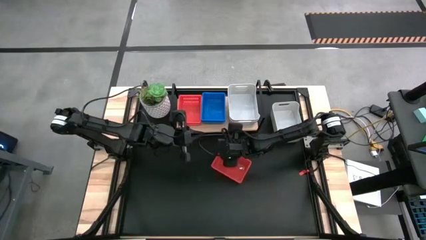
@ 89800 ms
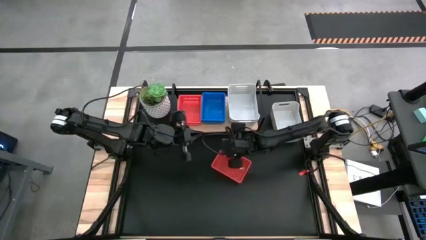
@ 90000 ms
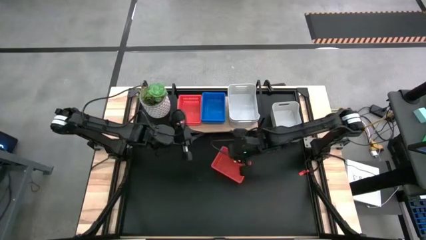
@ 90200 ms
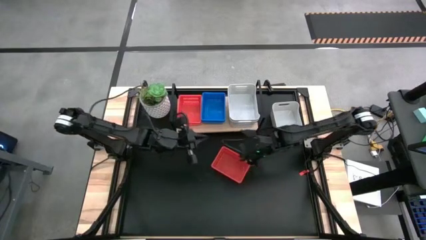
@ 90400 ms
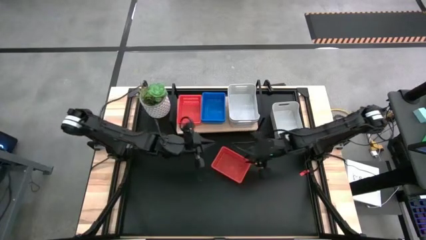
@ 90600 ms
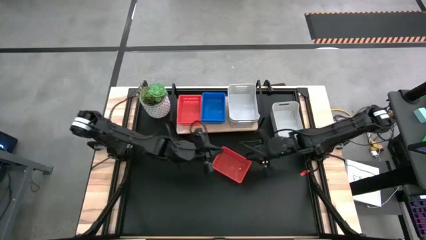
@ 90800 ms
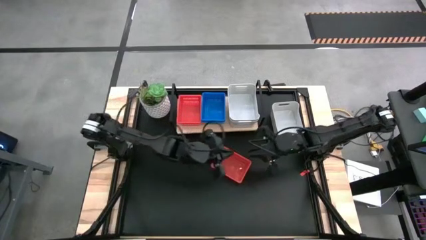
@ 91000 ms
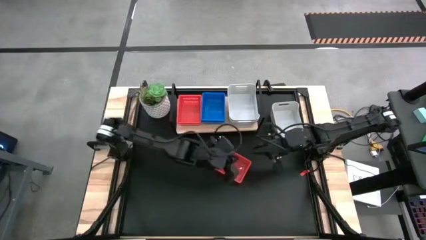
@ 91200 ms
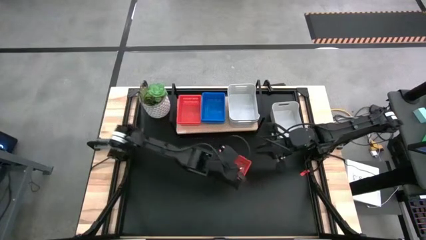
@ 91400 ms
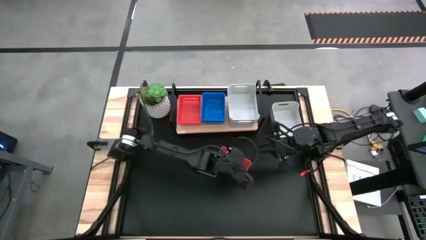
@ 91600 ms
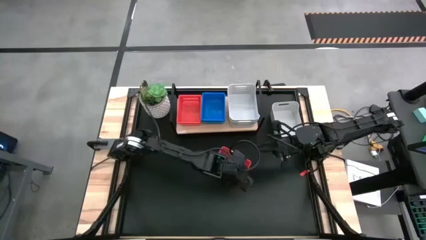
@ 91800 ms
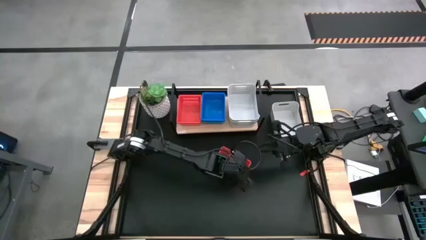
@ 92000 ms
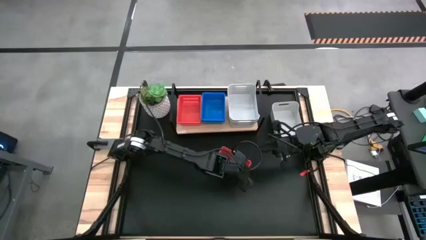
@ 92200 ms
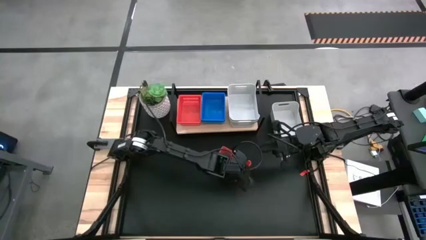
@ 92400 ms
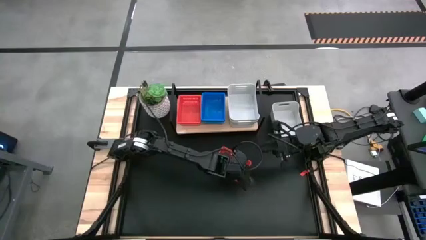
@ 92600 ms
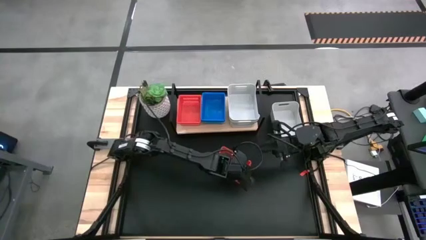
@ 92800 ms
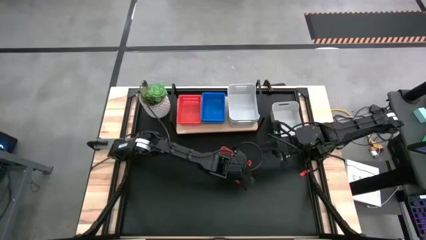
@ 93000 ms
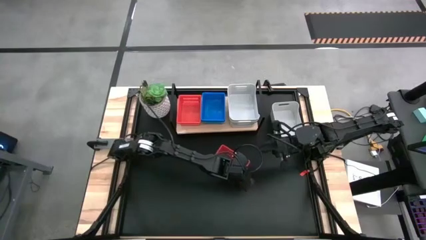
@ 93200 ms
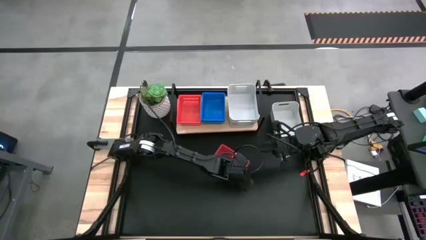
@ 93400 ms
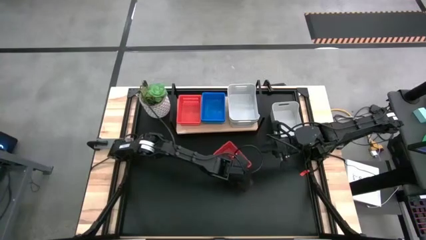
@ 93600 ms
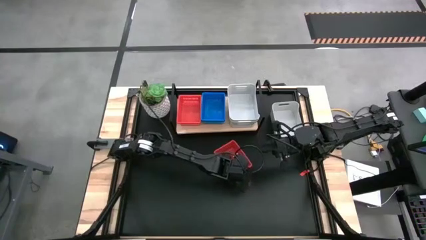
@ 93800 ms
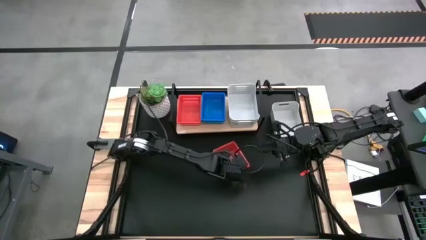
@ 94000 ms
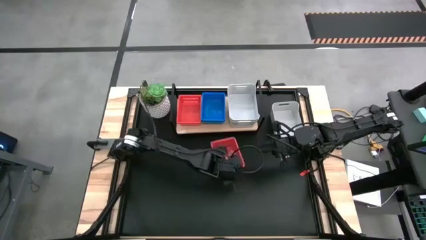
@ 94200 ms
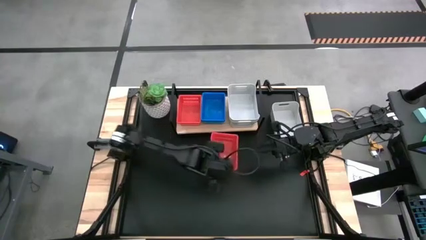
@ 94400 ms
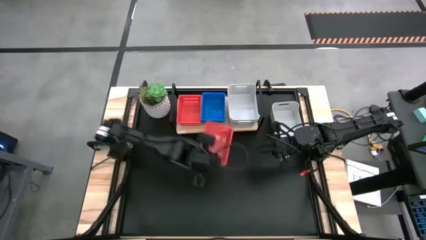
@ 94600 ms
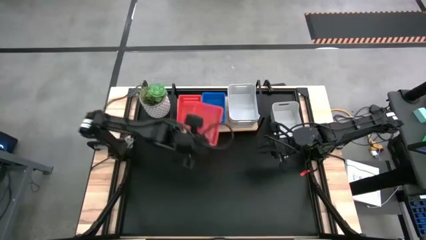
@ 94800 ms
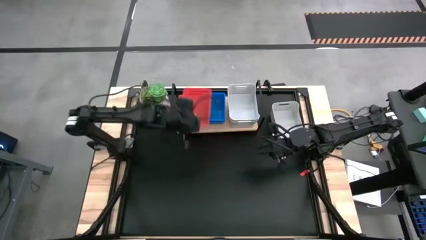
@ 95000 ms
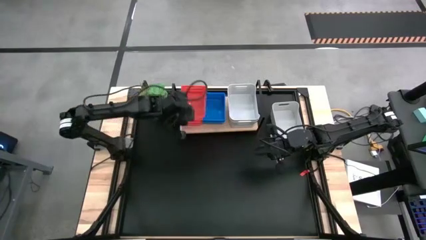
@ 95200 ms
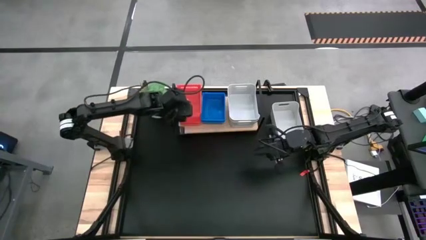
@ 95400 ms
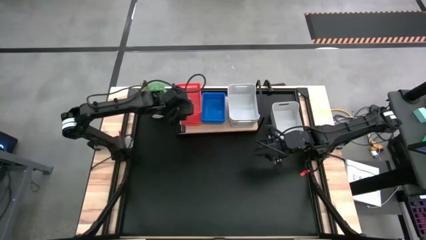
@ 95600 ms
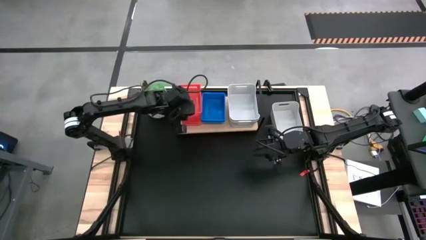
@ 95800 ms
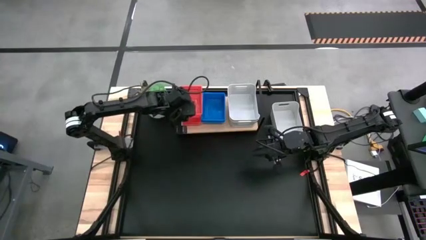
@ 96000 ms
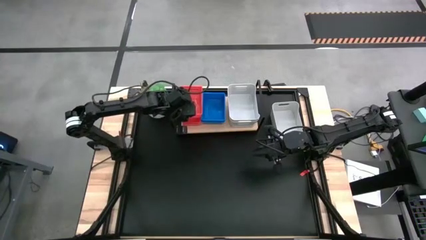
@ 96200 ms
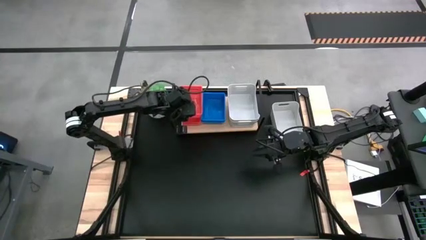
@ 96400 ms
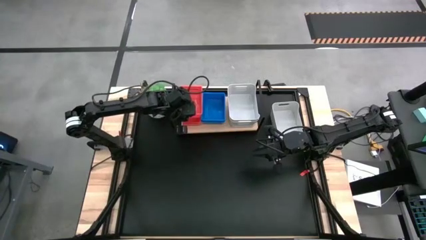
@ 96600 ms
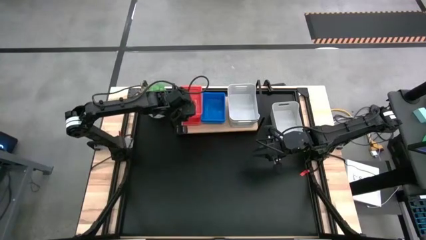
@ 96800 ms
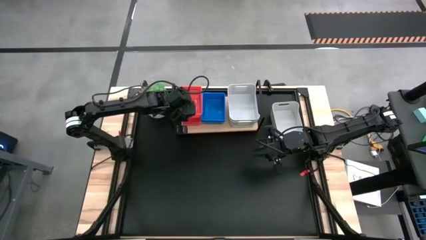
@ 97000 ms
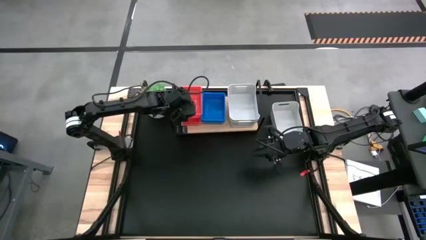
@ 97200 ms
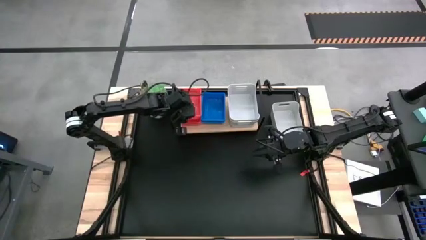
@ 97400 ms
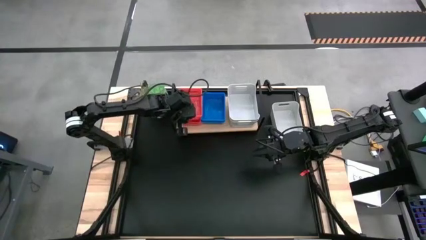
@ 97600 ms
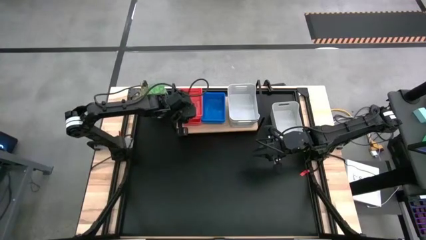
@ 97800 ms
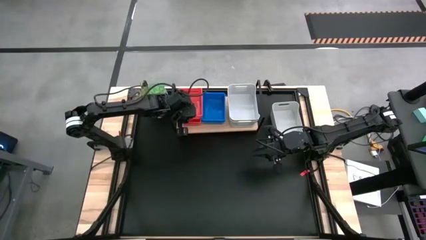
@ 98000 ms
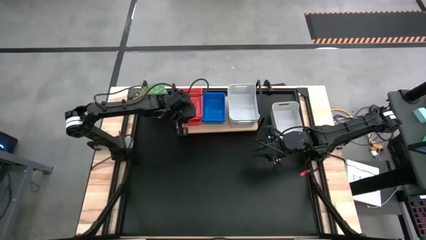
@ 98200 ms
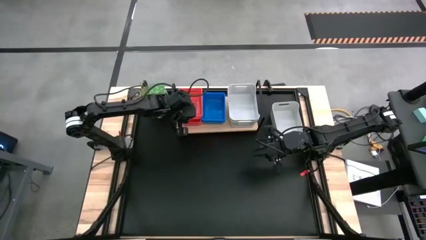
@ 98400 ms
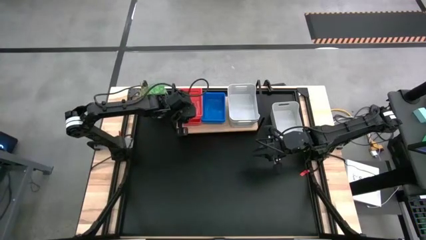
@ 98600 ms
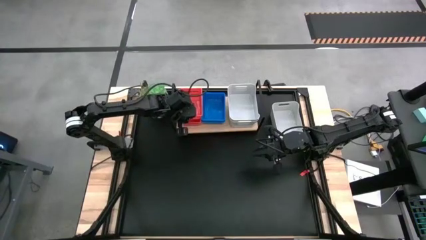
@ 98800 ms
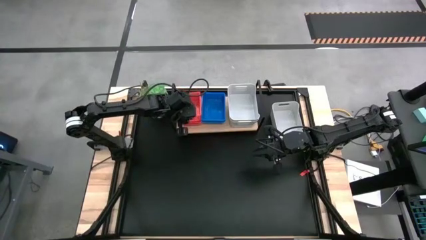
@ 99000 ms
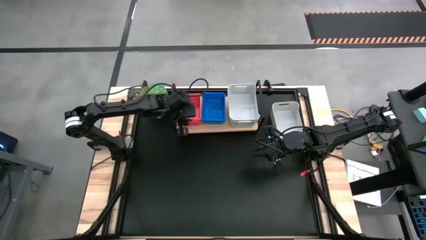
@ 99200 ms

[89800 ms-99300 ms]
Stack the red basket on top of the red basket on the shelf

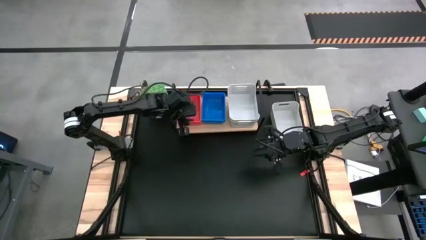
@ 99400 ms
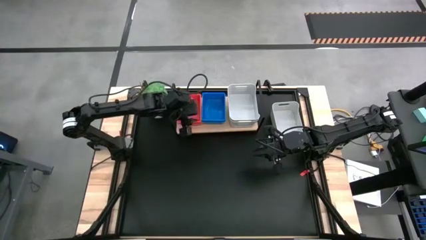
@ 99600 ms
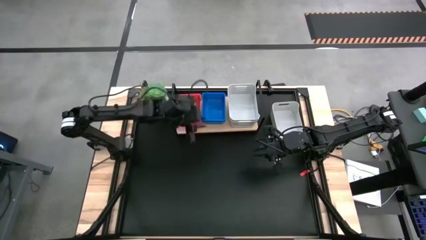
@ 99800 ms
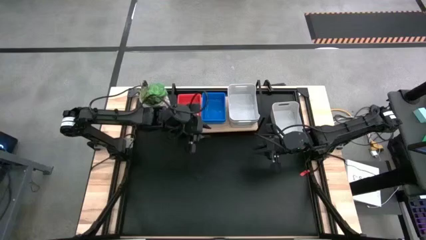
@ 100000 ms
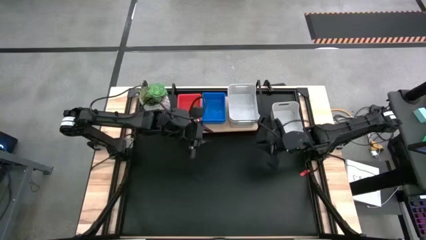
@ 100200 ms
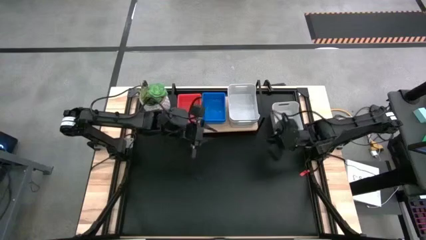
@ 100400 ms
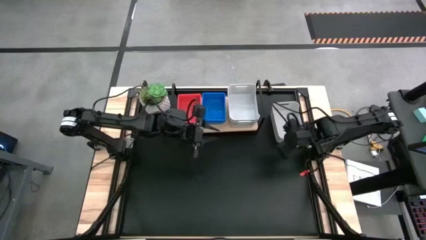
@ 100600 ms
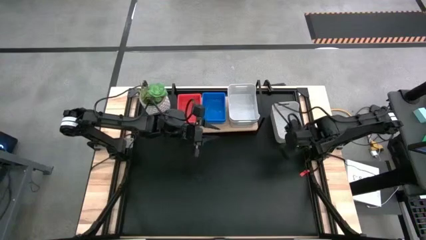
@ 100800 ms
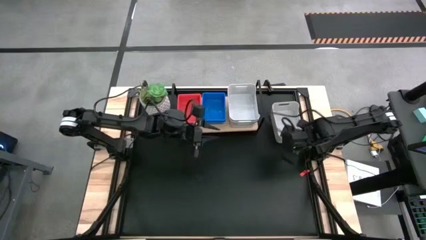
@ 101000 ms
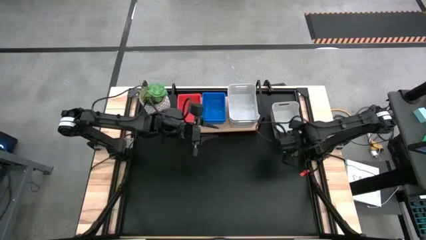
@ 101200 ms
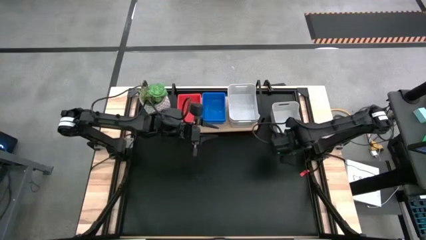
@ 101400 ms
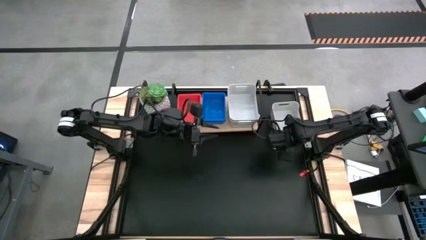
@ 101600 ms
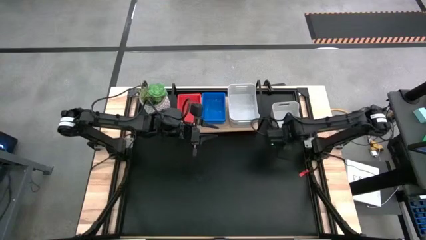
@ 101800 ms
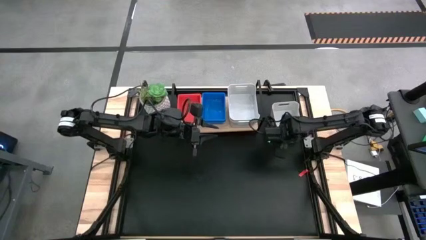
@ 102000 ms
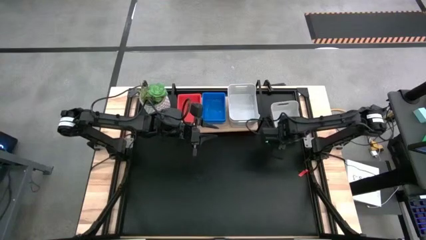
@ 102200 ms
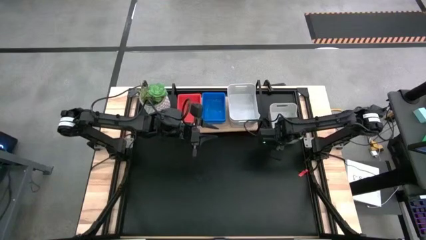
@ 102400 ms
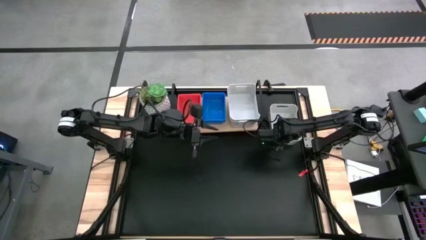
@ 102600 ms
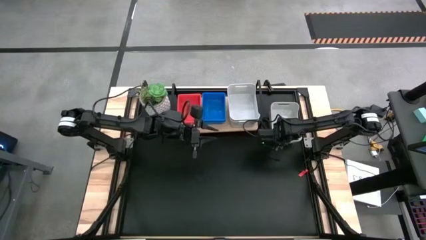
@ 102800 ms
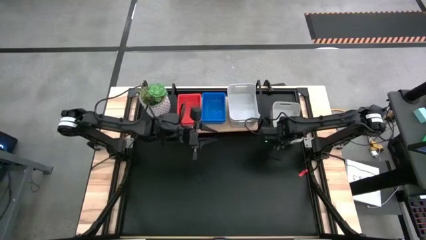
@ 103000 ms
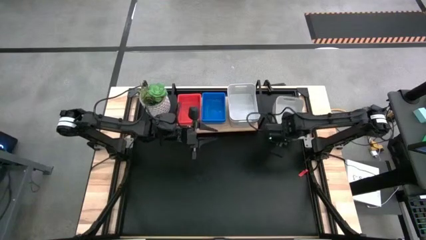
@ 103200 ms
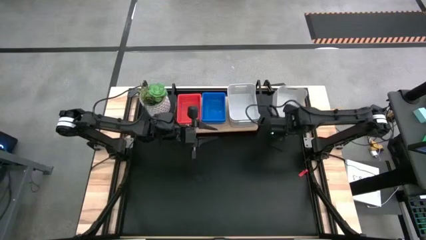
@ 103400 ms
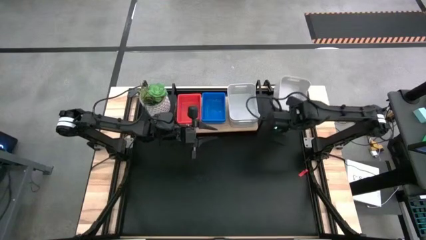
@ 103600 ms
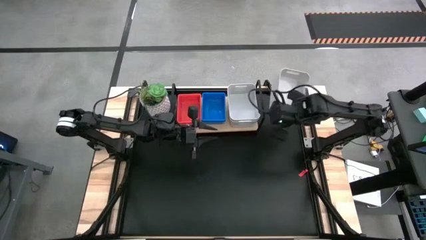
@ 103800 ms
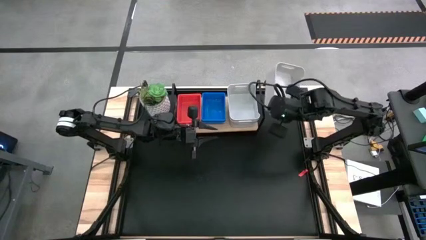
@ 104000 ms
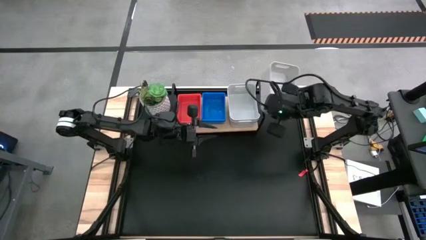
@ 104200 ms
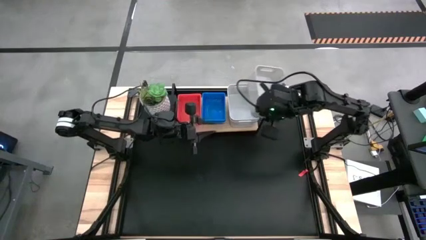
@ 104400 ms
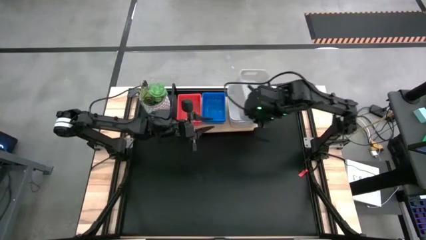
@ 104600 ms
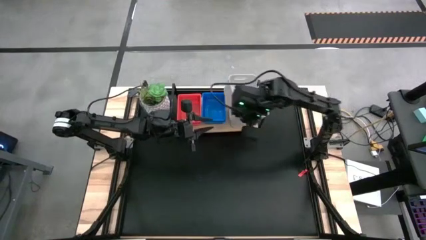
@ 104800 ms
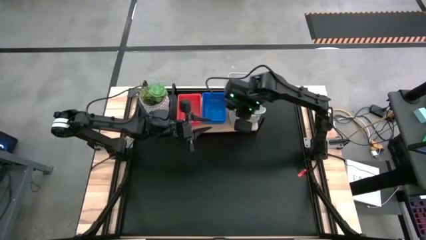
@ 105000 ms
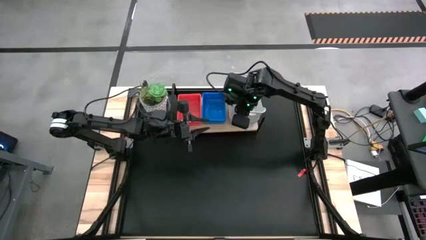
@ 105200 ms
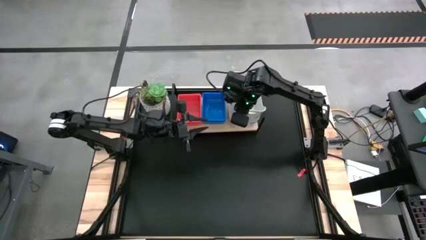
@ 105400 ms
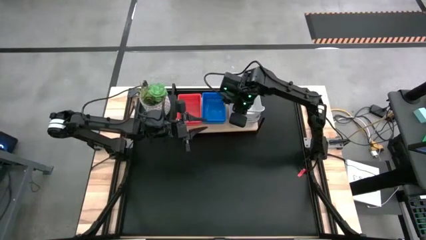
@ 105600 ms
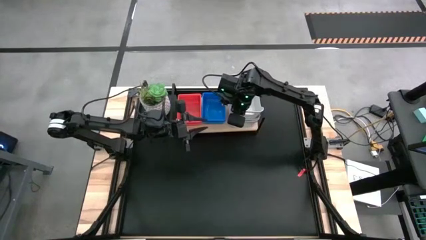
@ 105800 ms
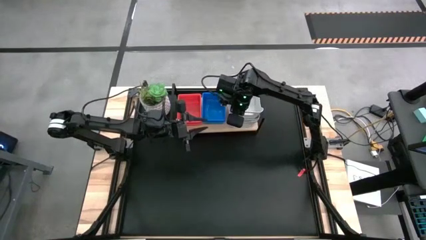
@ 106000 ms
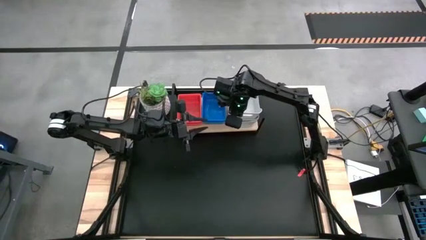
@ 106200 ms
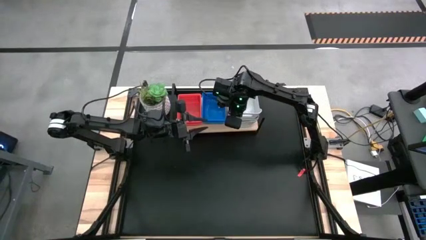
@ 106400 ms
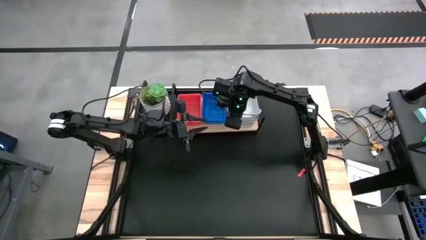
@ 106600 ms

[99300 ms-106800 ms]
Stack the white bin on top of the white bin on the shelf
